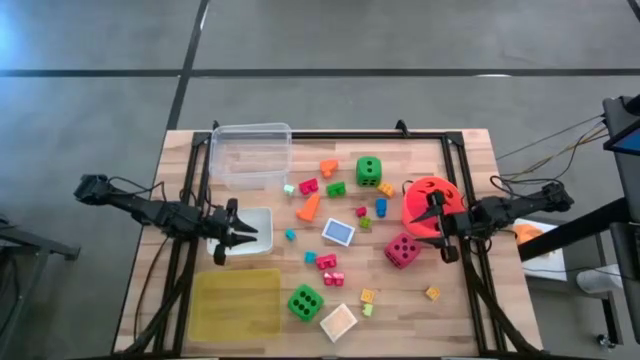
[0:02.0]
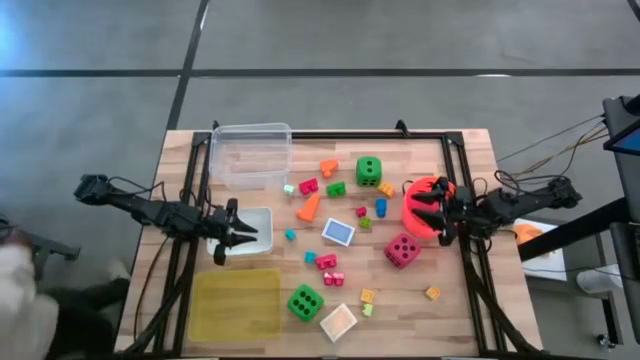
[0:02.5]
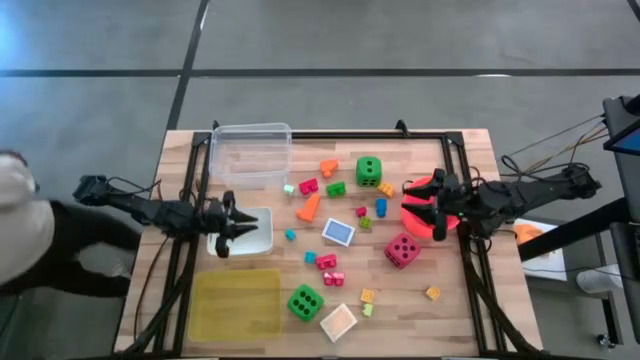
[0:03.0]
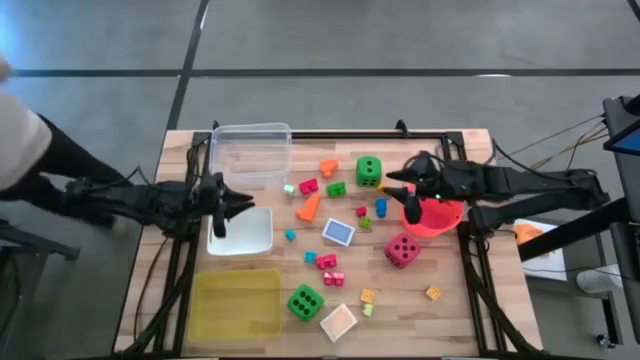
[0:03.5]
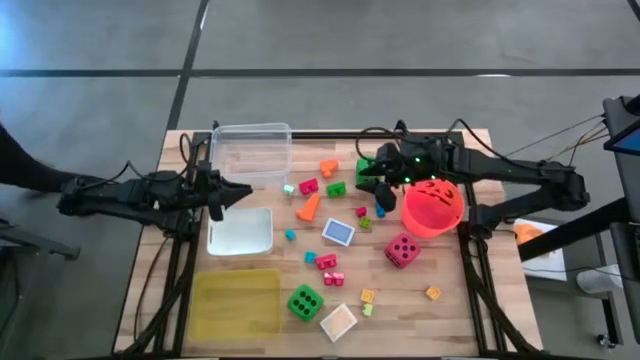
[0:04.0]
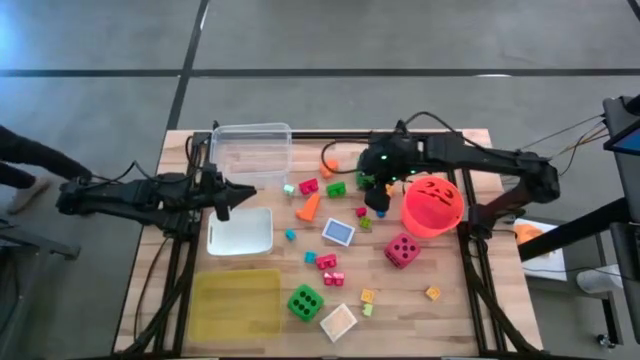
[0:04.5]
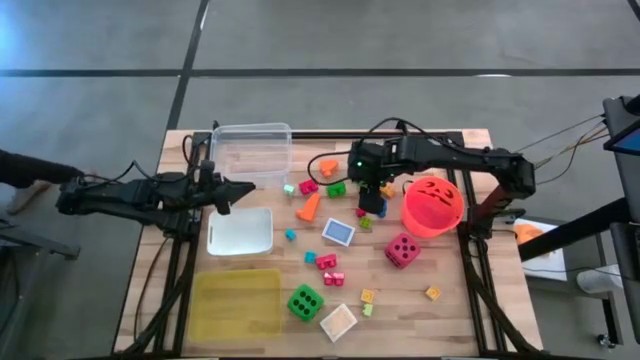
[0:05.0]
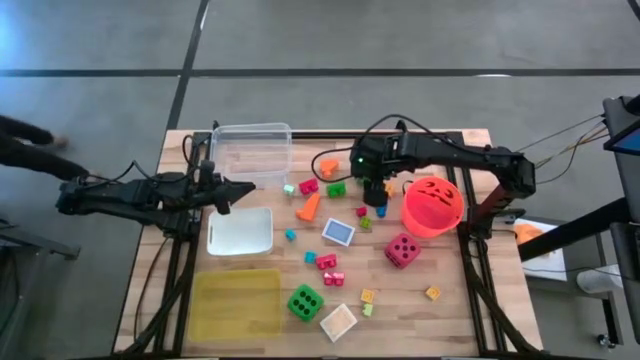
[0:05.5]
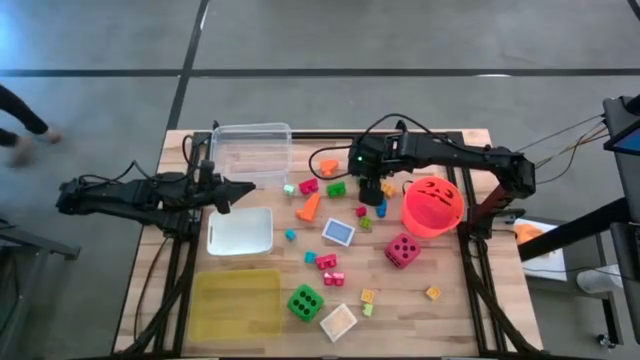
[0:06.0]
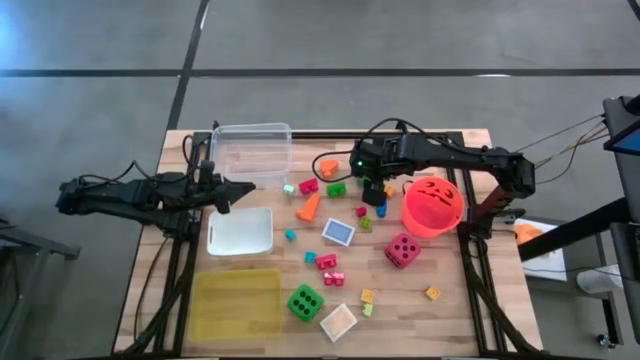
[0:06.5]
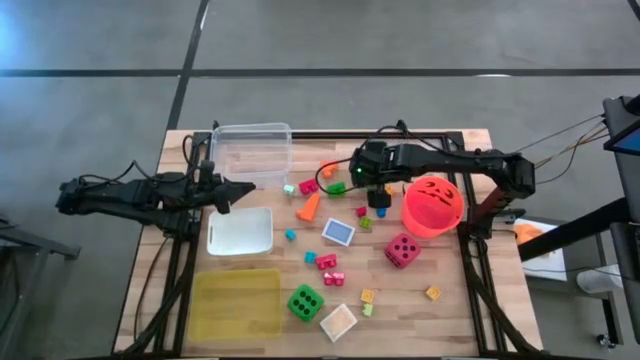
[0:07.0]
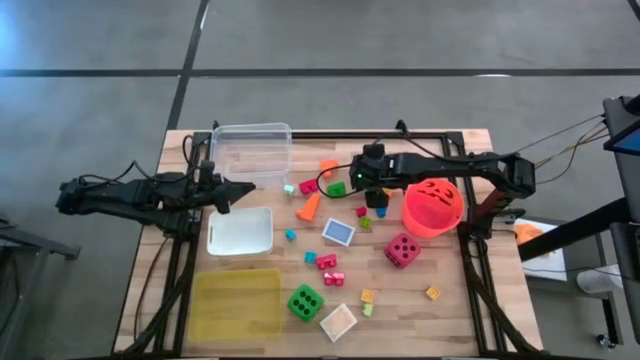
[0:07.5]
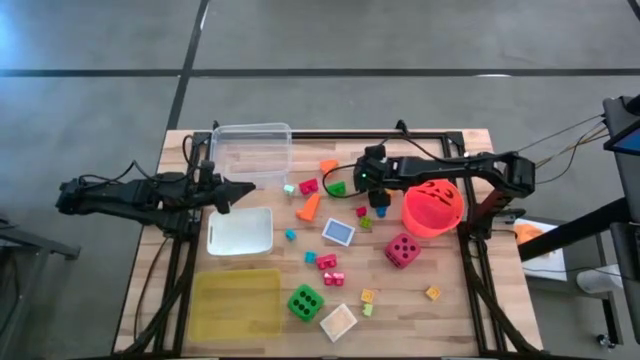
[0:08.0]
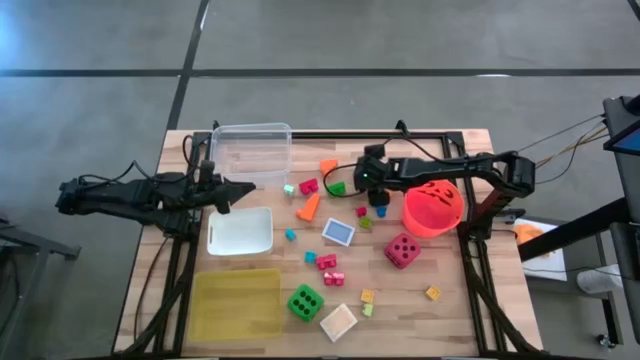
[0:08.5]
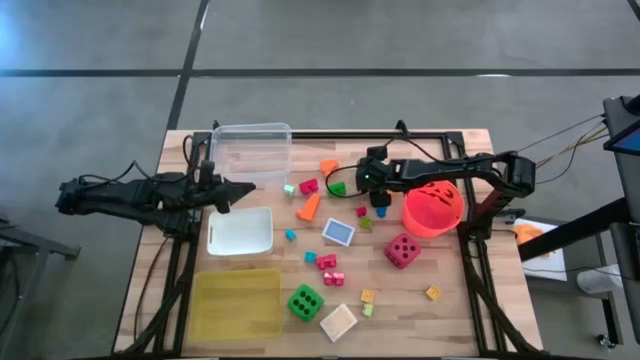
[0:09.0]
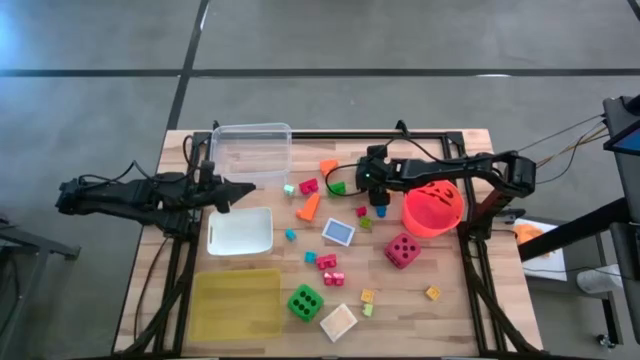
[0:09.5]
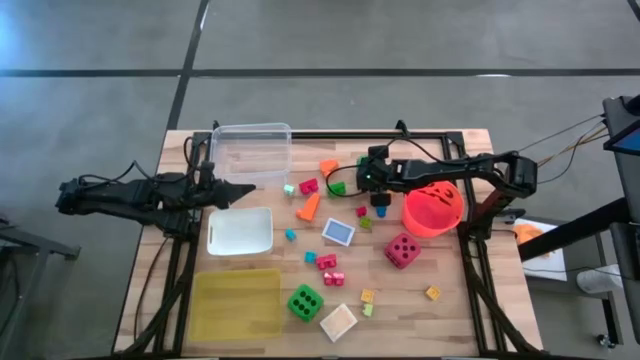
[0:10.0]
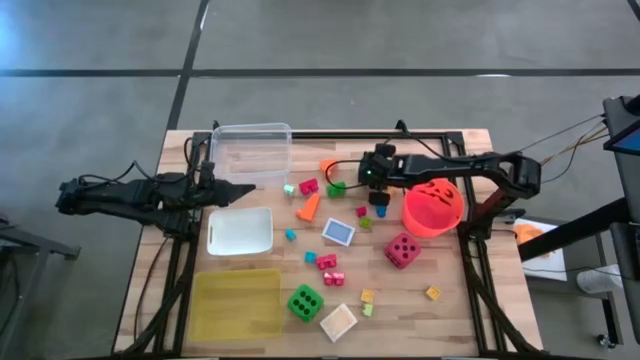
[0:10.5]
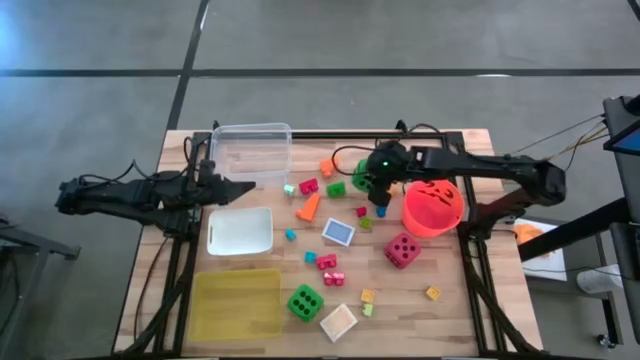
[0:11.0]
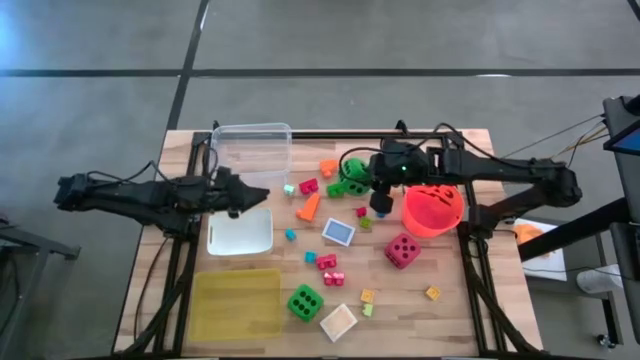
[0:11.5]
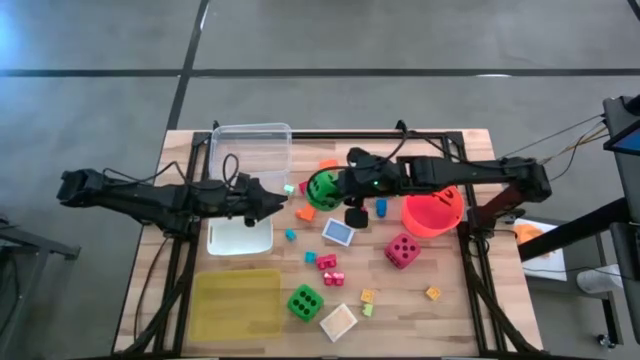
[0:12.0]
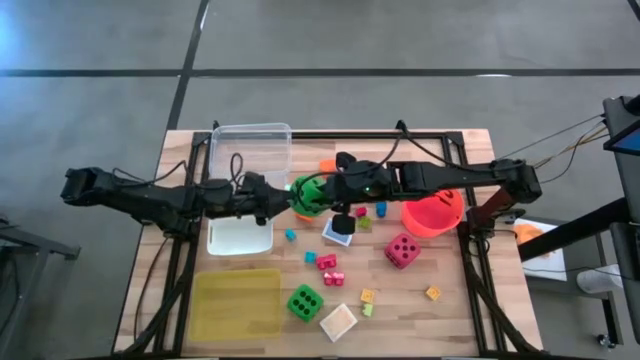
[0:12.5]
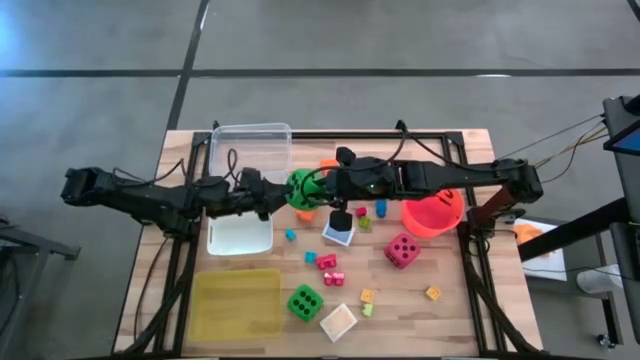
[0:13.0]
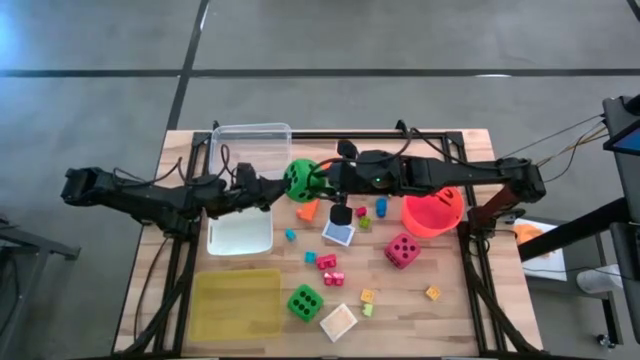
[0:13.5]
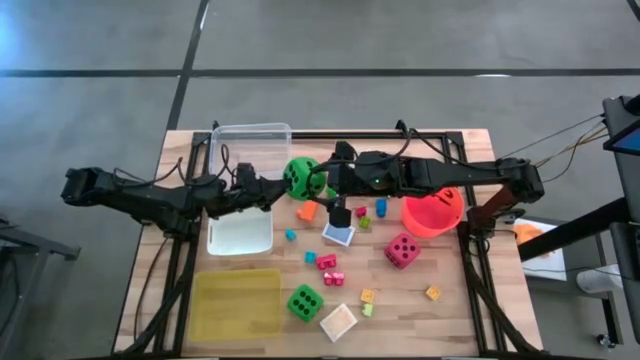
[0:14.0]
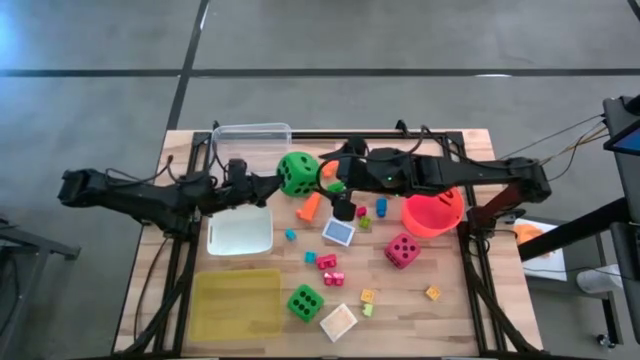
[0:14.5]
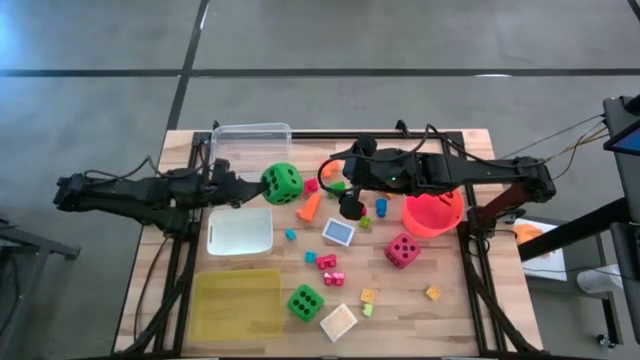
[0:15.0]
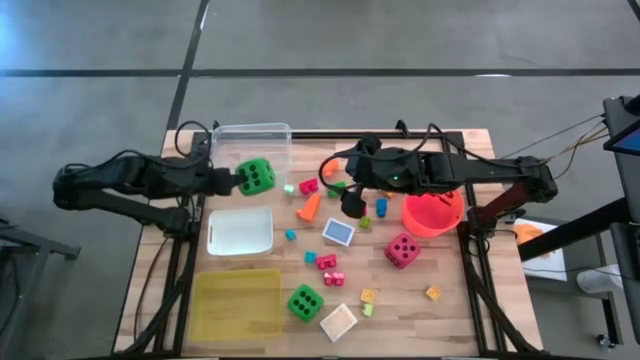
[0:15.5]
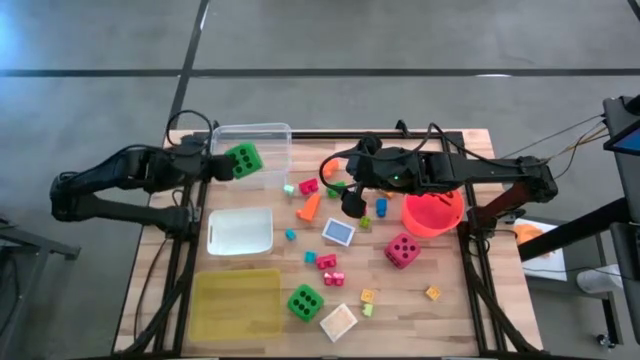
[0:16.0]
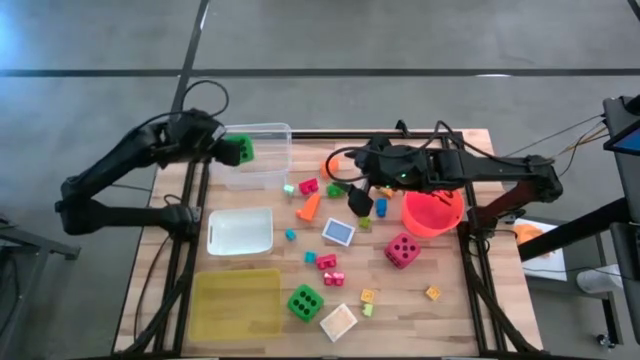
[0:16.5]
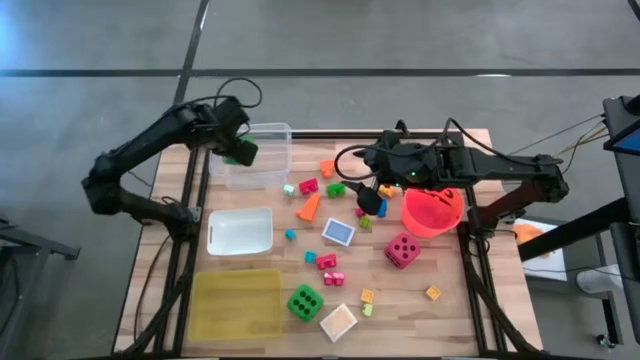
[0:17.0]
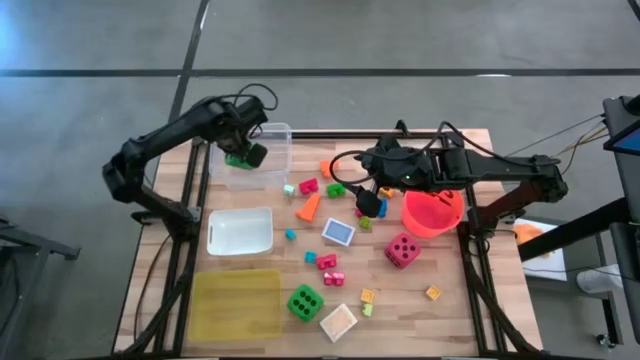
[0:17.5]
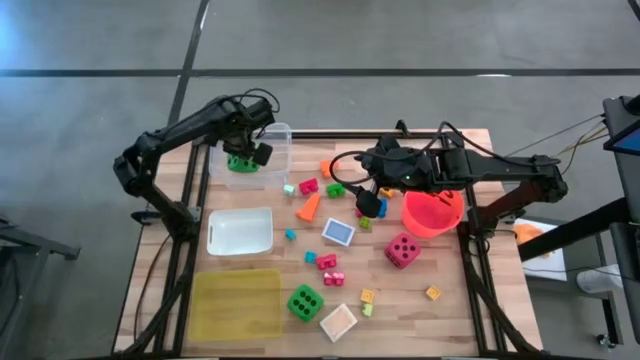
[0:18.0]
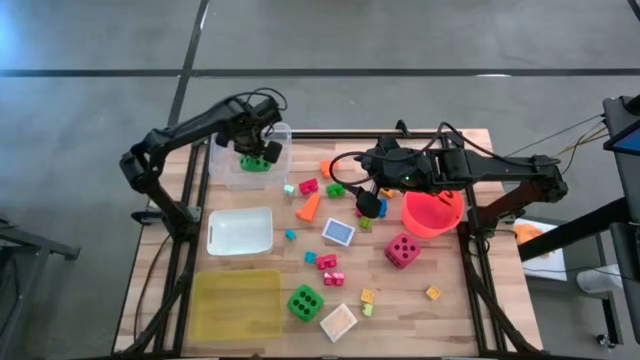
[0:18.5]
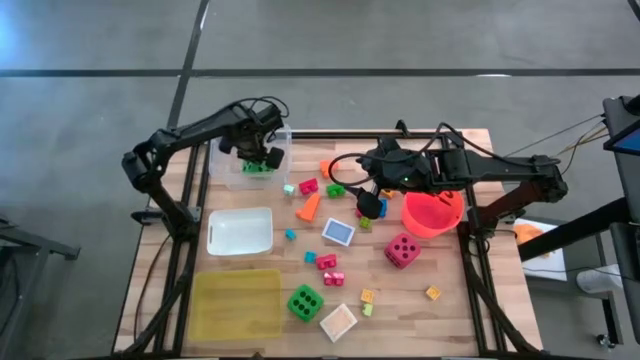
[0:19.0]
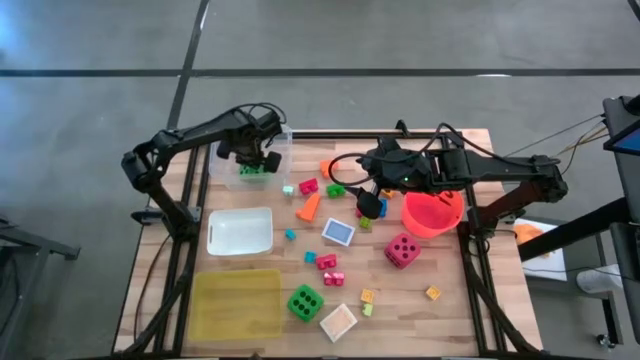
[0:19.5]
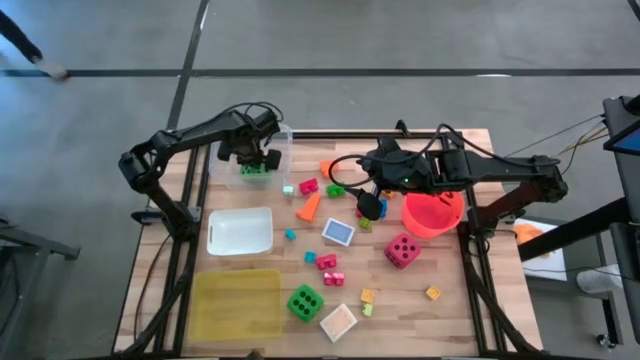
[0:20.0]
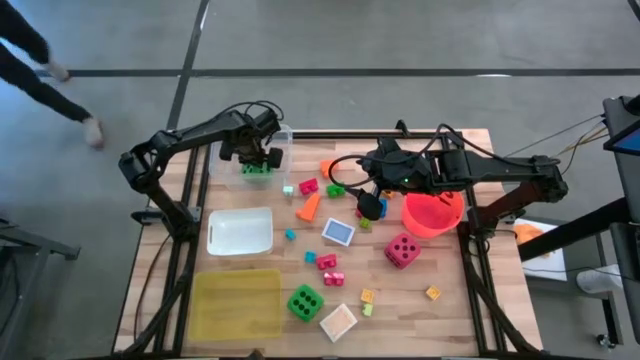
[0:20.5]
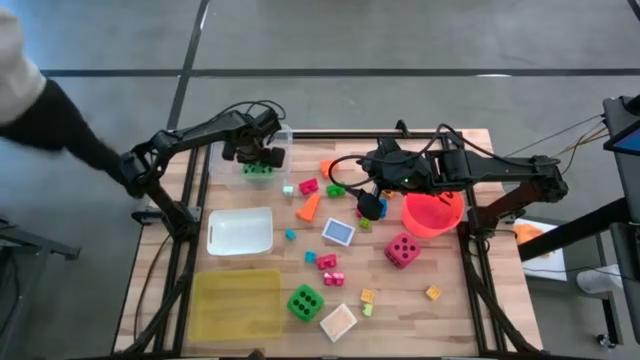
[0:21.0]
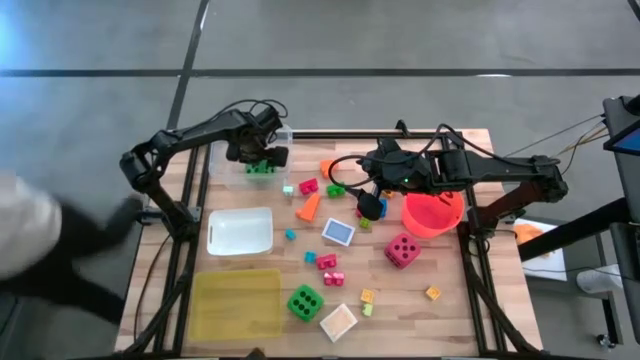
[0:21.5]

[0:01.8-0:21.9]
Task: Pick & Place Toys
Put the green dice into the transparent bin
